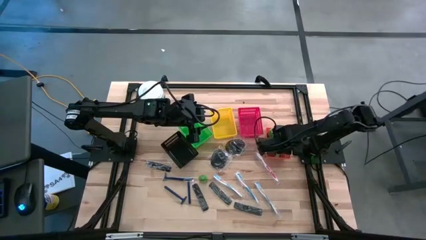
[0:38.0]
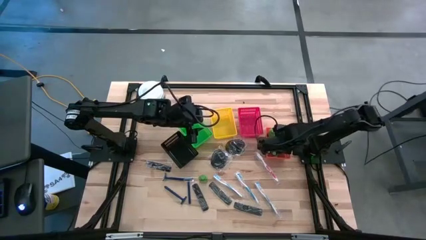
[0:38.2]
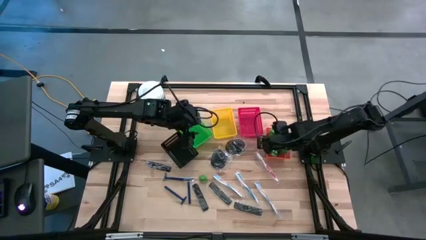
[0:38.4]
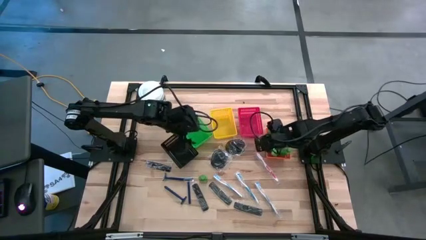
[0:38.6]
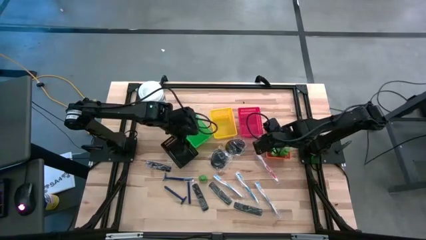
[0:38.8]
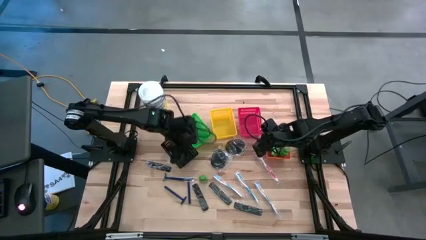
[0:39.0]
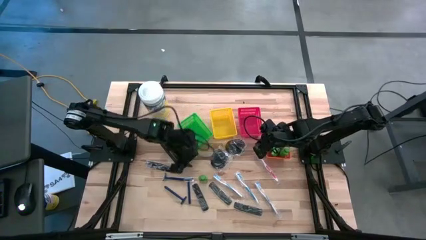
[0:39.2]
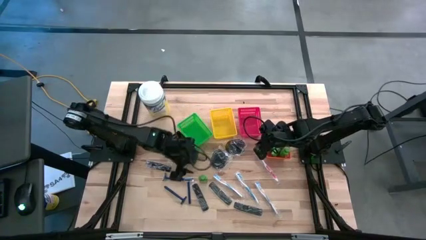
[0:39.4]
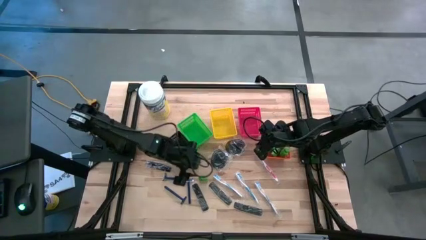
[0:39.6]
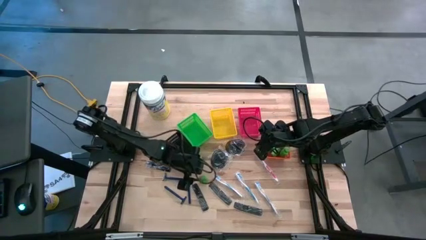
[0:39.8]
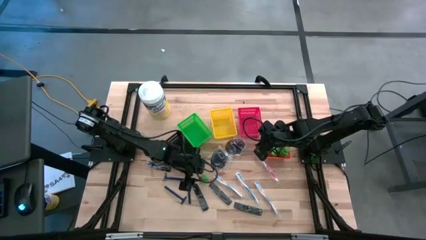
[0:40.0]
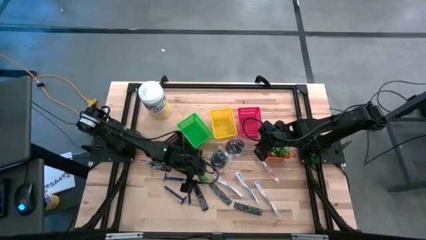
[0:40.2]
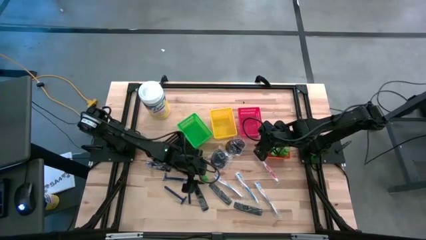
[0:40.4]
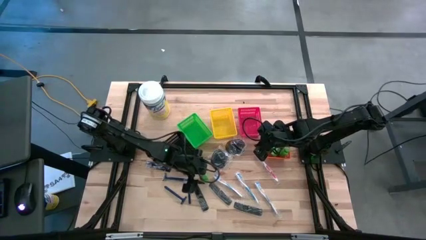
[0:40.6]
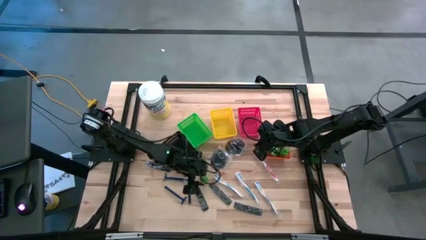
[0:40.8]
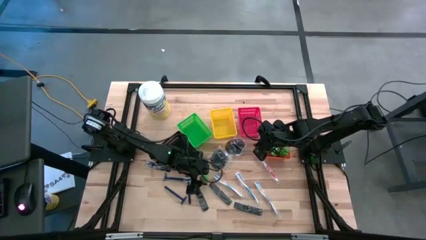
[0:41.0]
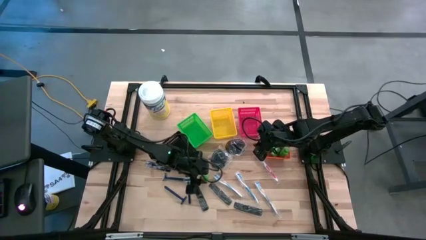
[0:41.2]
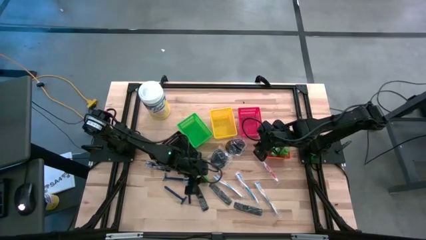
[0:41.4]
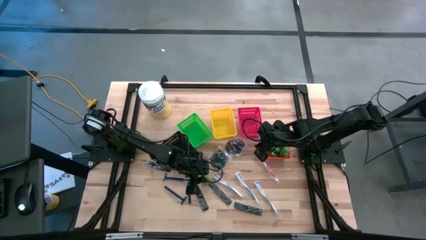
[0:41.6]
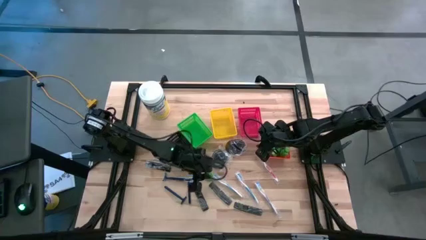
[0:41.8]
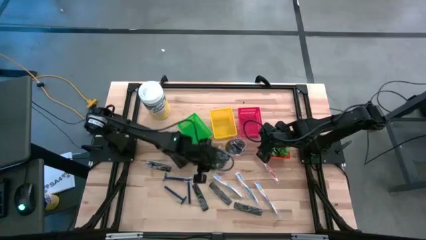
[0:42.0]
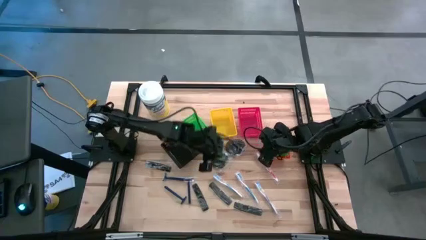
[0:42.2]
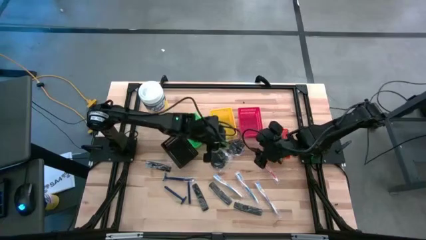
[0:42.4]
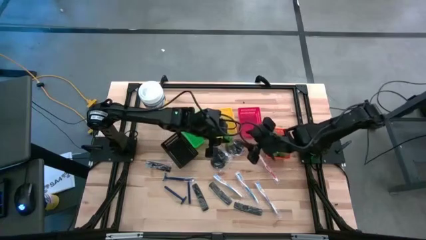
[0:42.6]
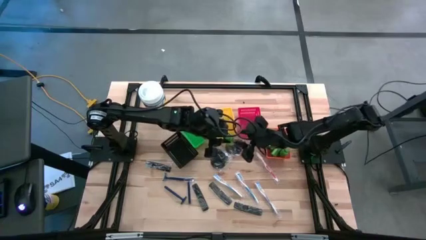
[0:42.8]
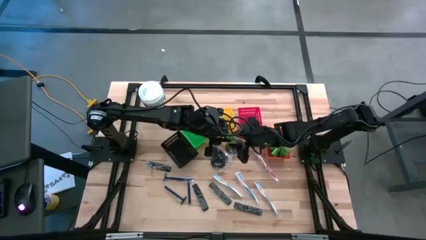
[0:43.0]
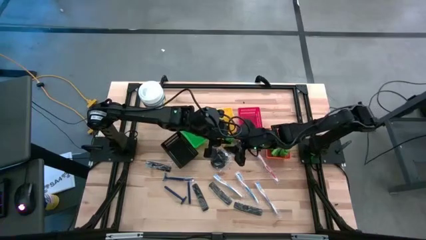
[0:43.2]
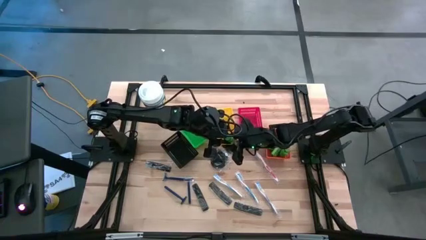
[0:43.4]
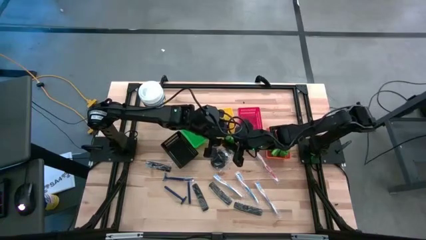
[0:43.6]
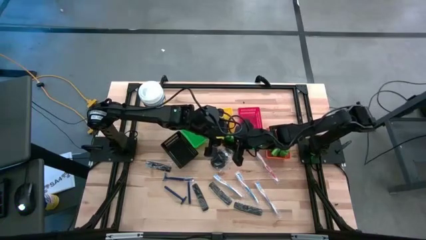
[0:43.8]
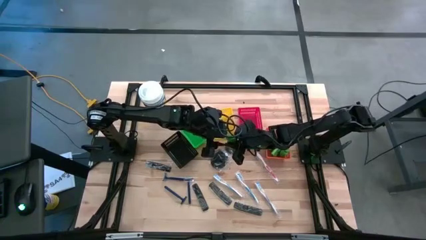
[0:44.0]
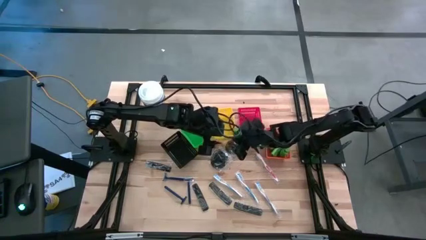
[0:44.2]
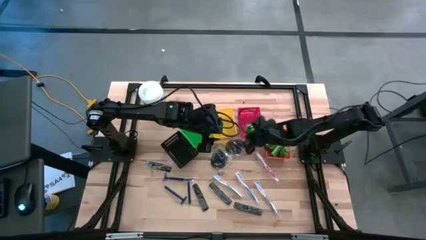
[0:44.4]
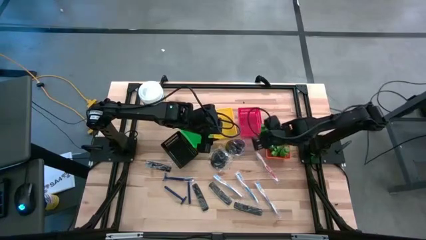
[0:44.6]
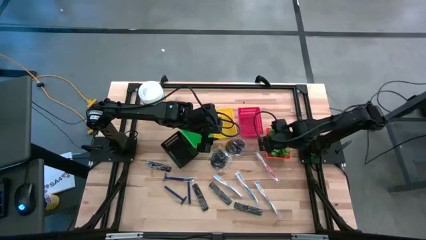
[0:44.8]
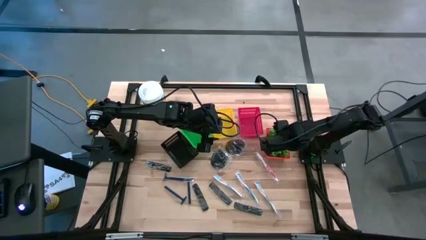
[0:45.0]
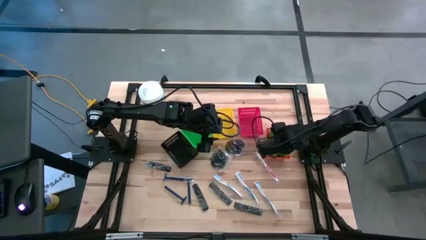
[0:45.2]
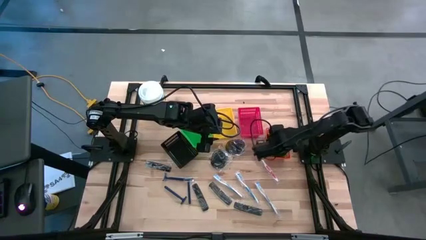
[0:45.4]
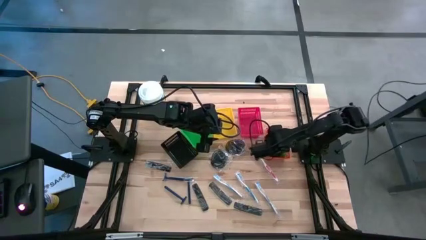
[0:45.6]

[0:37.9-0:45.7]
Task: Pick & Place Travel size toiletries
Put the green shampoo into the orange bin

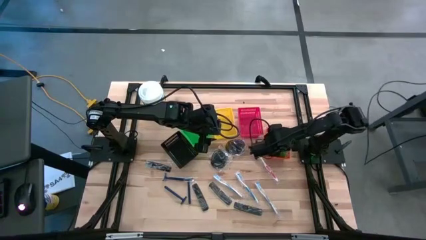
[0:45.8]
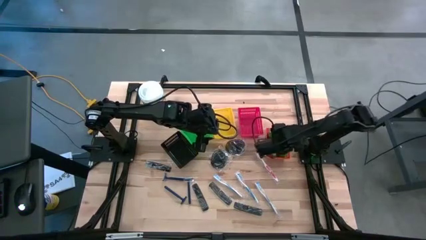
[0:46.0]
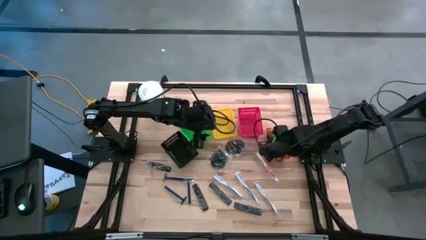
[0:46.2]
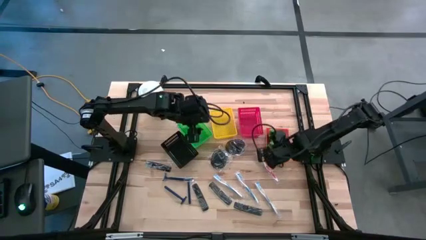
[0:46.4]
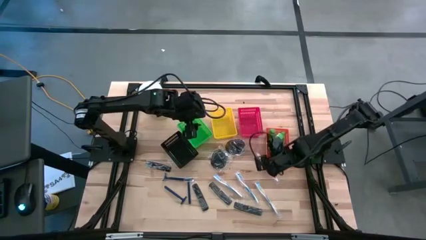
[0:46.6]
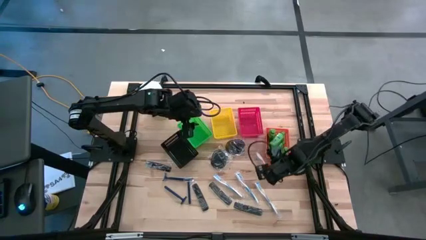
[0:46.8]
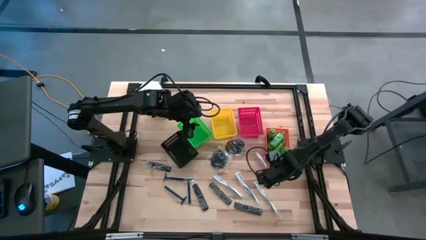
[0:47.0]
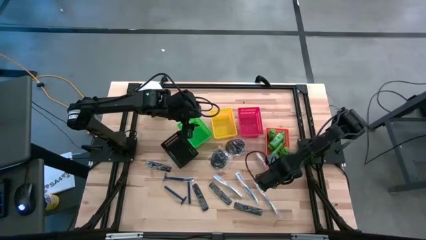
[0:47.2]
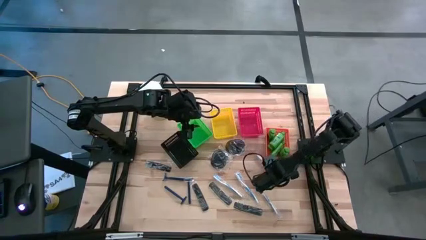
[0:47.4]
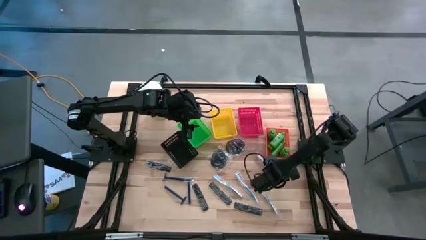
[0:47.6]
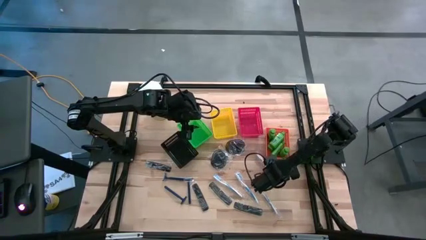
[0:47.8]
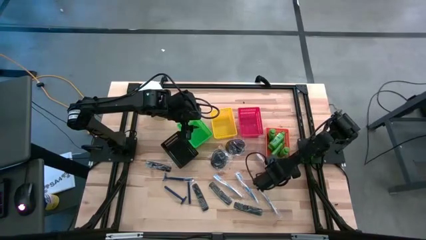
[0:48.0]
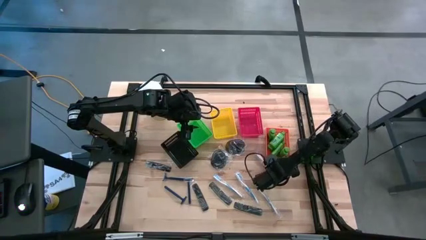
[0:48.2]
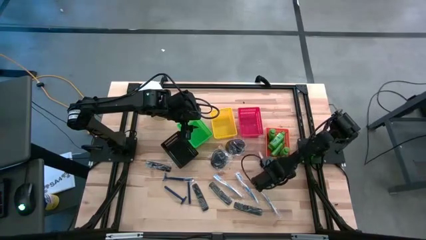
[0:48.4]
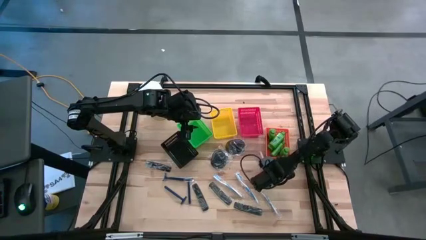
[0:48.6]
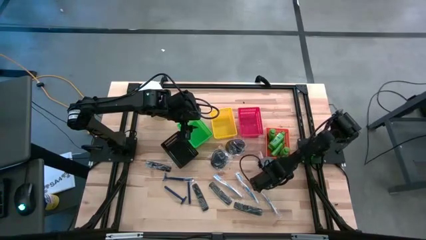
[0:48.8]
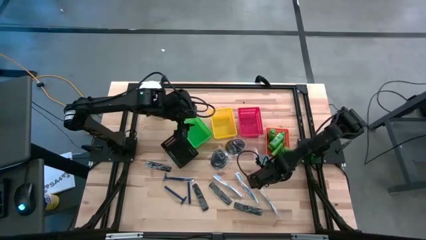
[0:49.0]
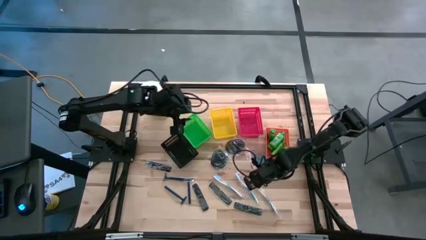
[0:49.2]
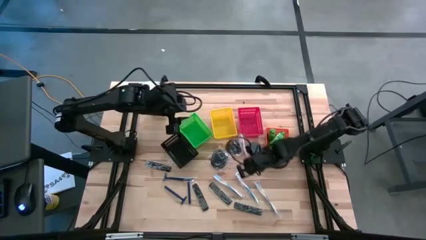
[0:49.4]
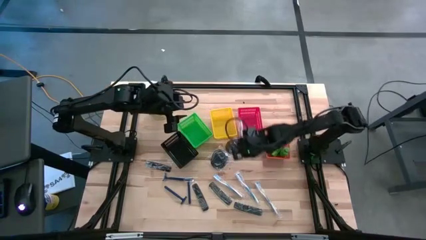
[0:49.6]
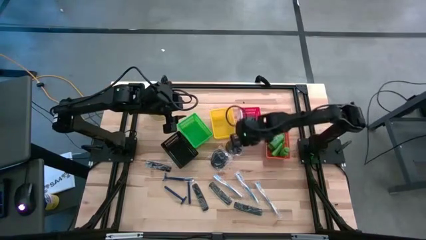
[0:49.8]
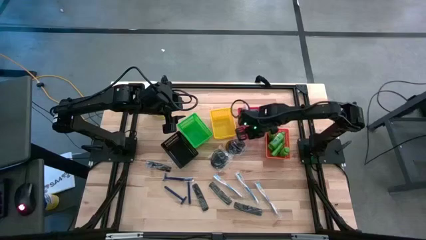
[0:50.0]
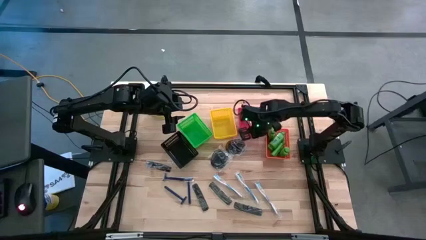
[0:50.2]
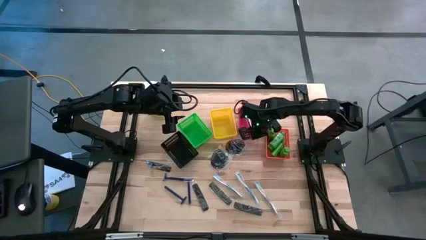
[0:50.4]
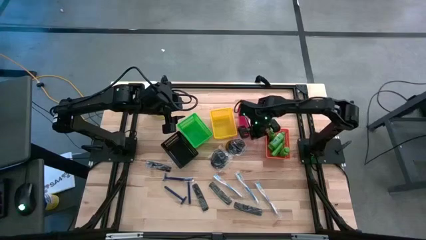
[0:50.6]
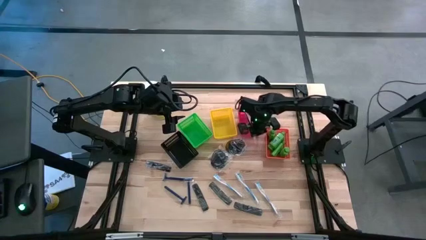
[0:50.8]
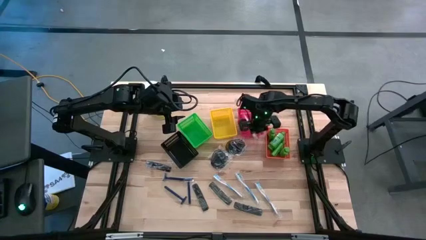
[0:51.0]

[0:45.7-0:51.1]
Put the orange toothbrush into the red bin

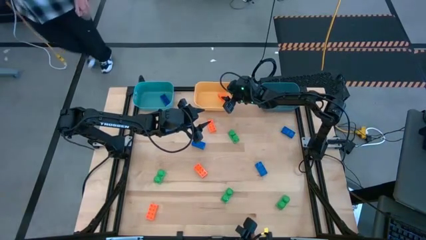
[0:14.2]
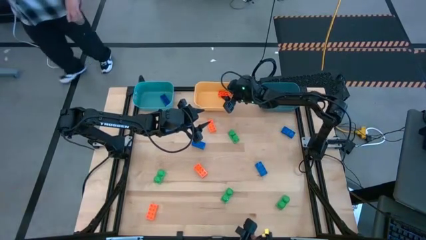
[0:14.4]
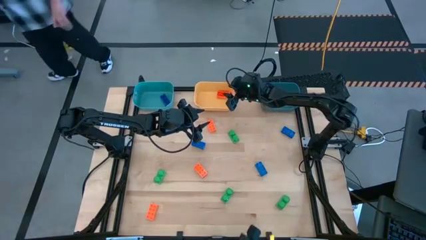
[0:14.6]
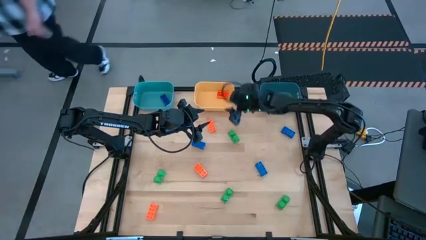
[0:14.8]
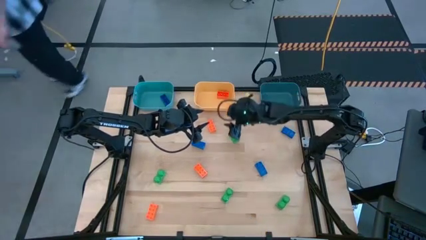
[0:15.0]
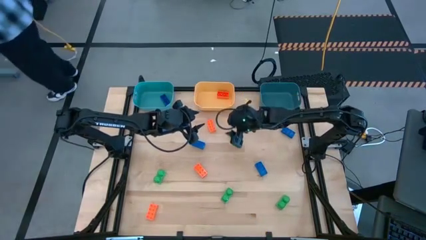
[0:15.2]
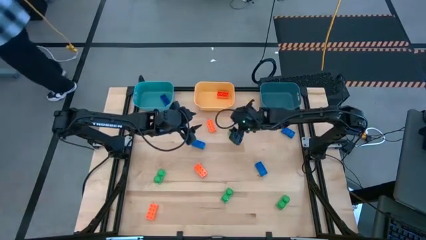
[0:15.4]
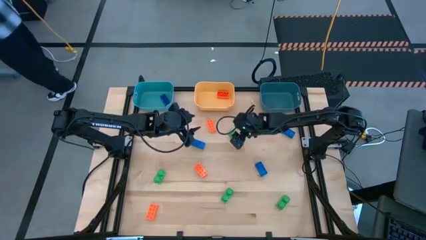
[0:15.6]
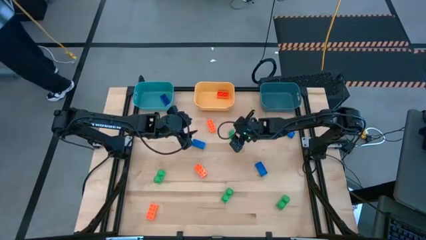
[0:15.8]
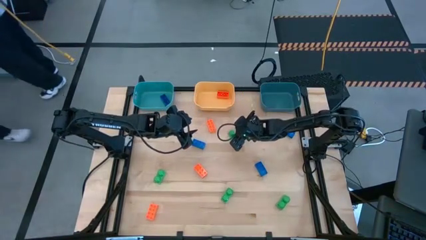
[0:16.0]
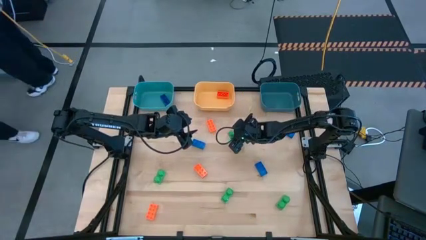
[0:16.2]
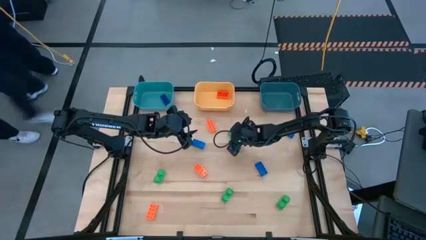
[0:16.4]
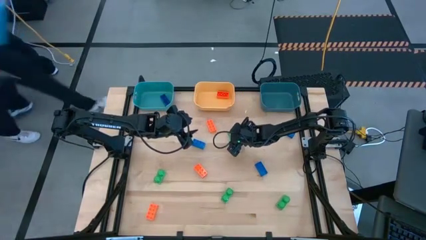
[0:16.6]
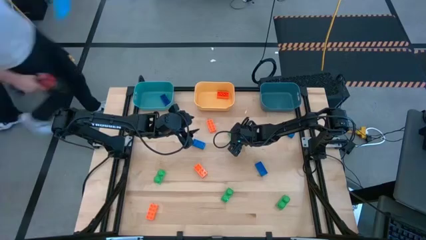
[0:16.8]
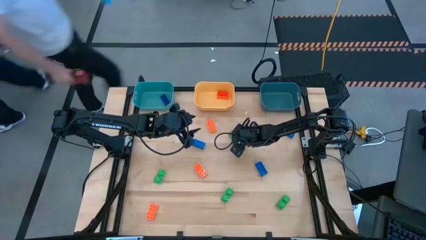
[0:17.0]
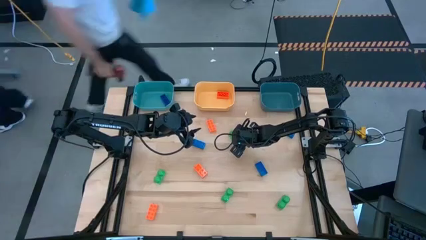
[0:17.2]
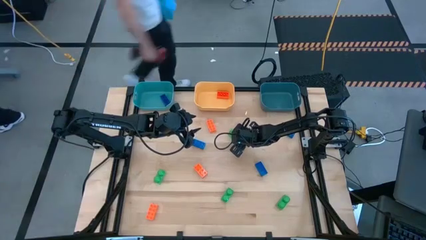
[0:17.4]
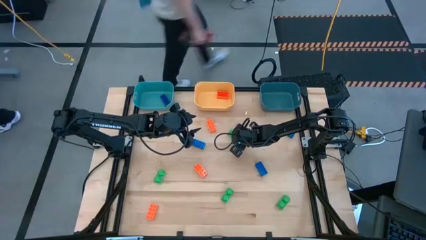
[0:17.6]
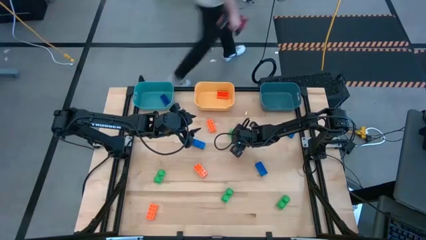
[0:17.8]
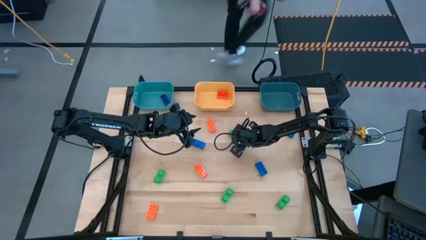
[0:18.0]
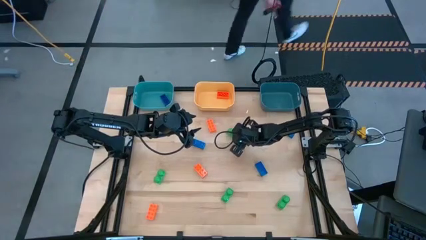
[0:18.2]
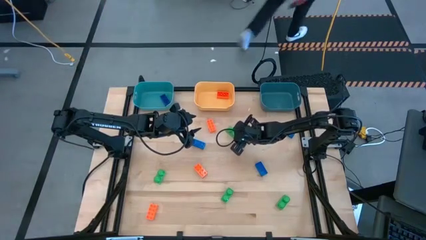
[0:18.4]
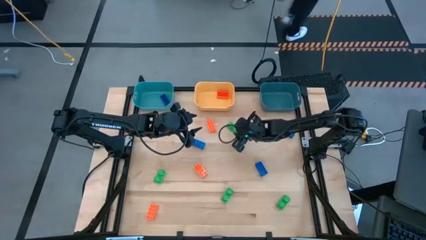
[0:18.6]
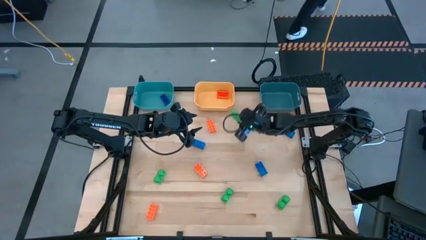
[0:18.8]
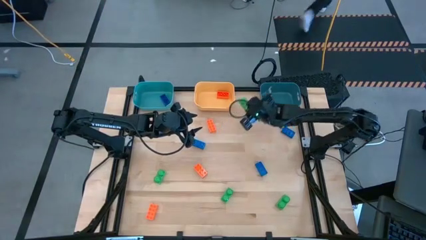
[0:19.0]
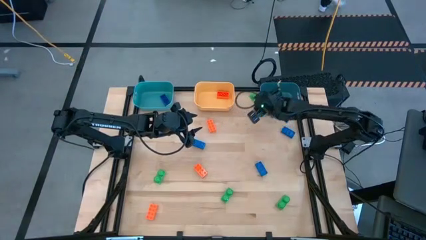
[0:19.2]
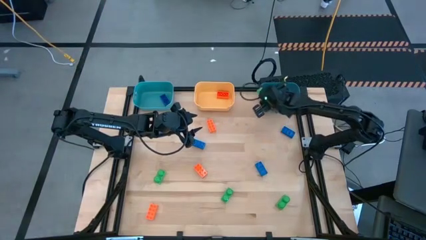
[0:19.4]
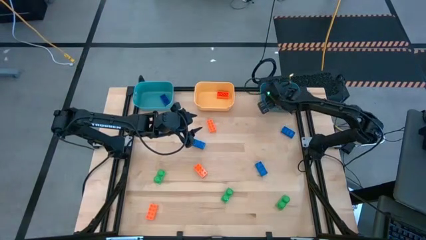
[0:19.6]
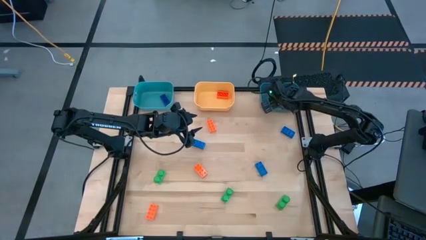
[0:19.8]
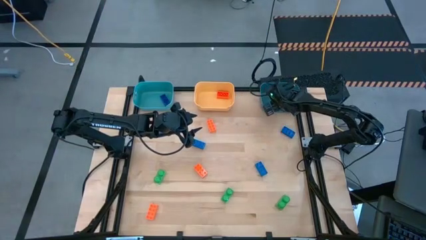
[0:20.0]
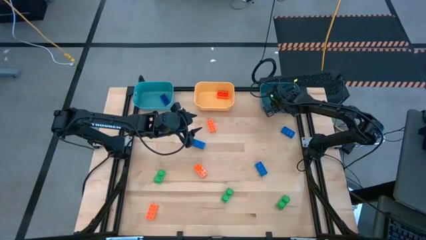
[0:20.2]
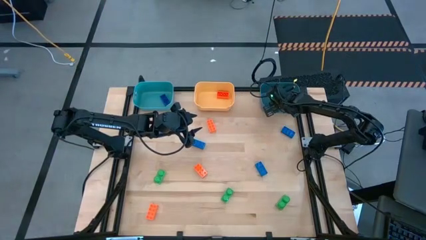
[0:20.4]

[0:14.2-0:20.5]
Task: Sort & place blocks by color
Put the green game piece into the dark blue bin
